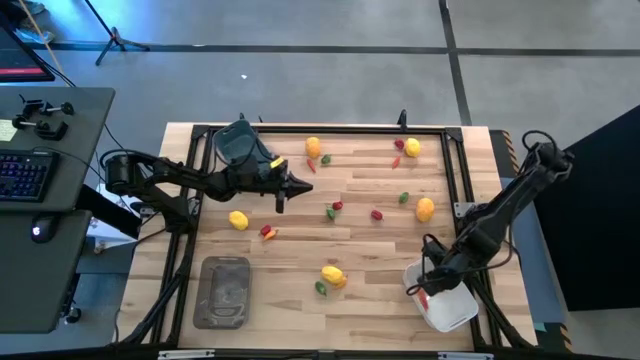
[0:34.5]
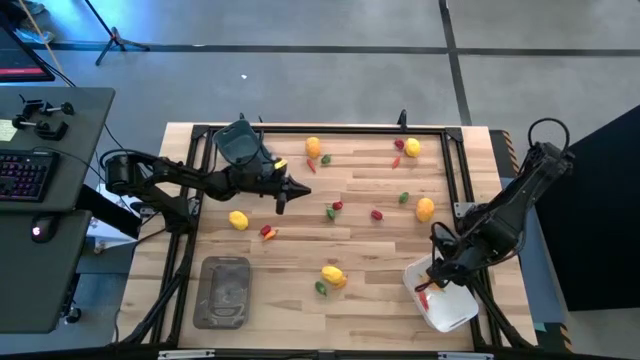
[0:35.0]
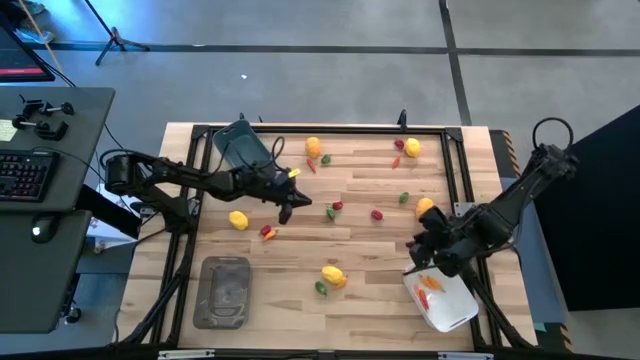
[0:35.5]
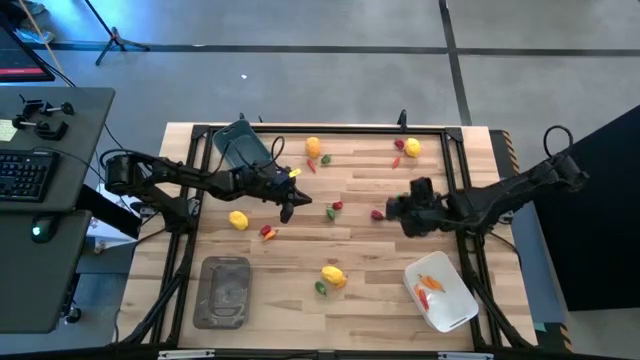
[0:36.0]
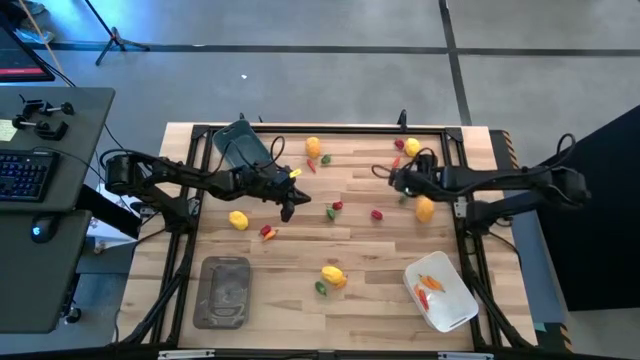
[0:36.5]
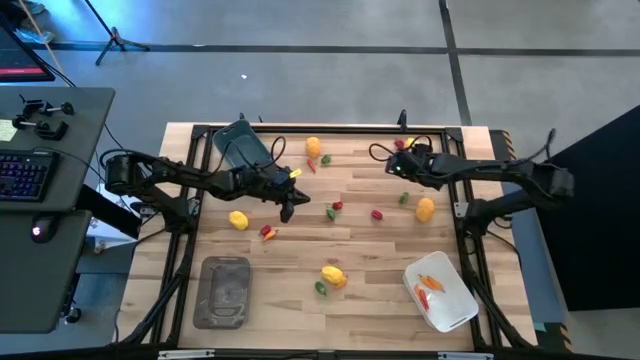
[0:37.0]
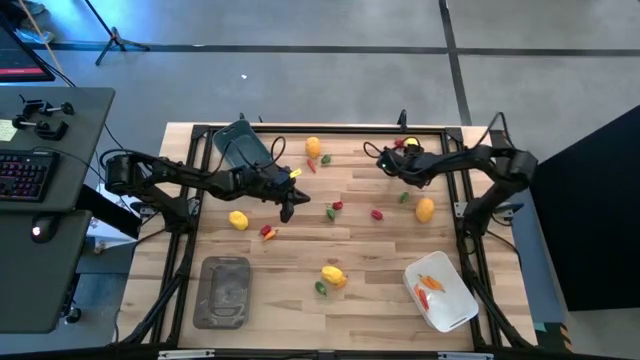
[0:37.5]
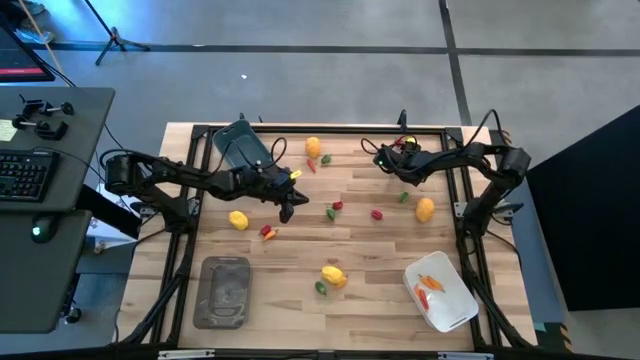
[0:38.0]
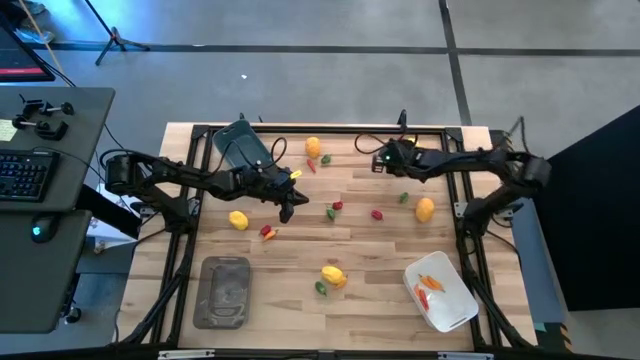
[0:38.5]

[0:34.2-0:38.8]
Task: Sort produce into baskets
Put the dark orange chili pepper into the white bin

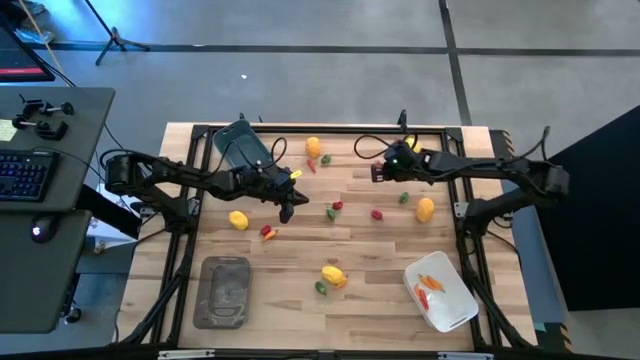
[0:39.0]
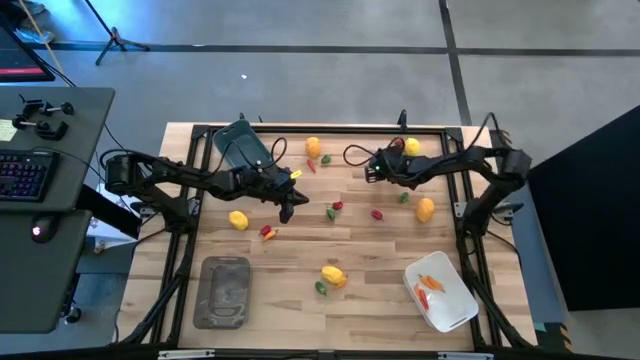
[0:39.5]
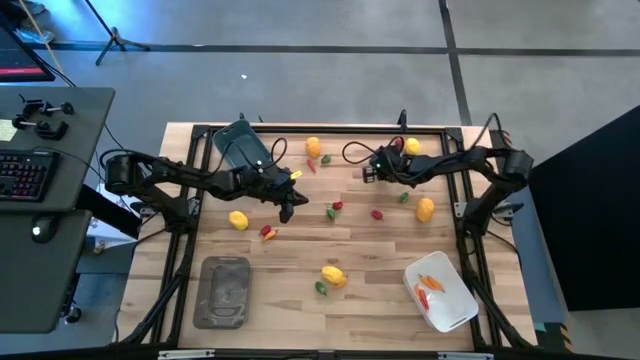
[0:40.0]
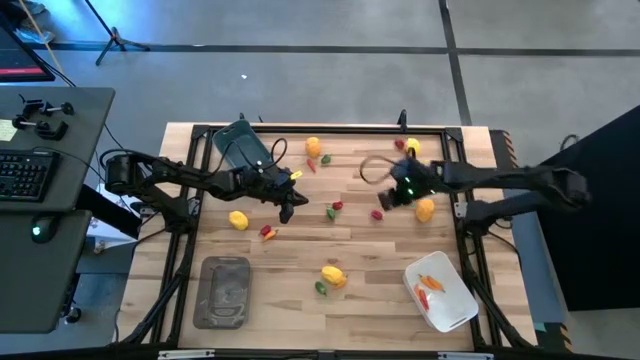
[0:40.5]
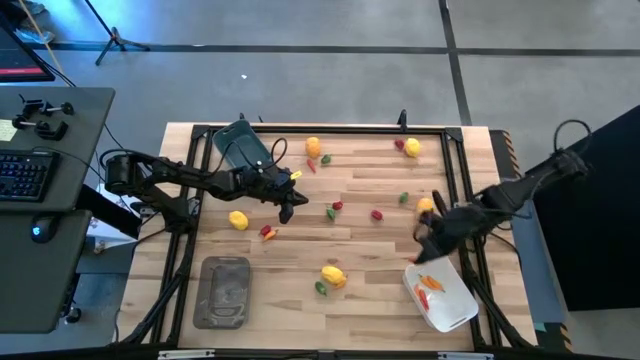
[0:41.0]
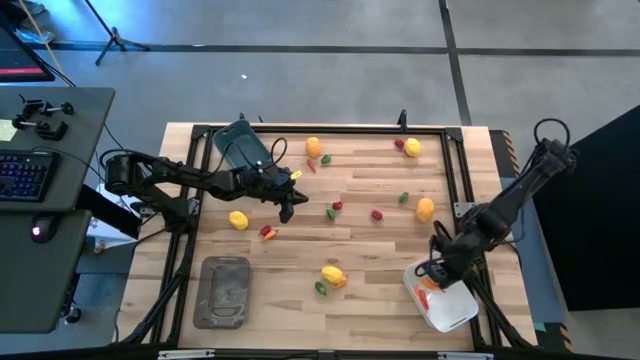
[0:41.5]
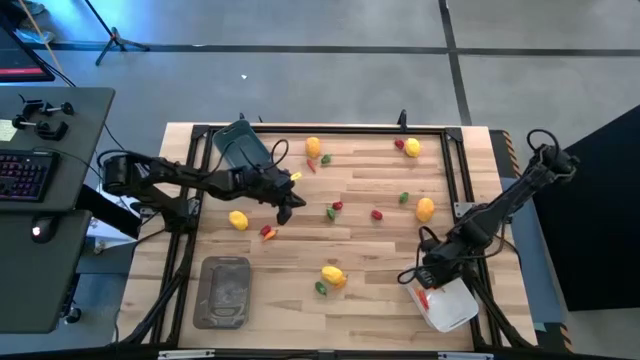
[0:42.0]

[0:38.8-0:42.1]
Put the dark orange chili pepper into the white bin

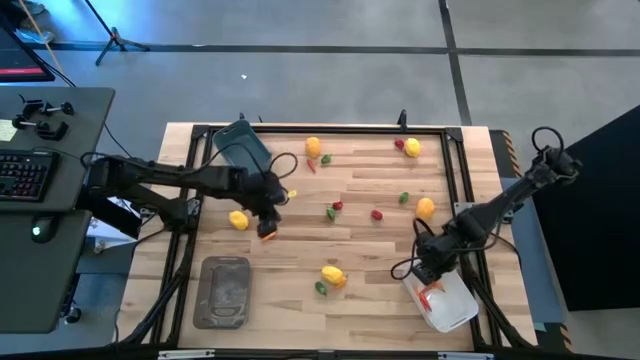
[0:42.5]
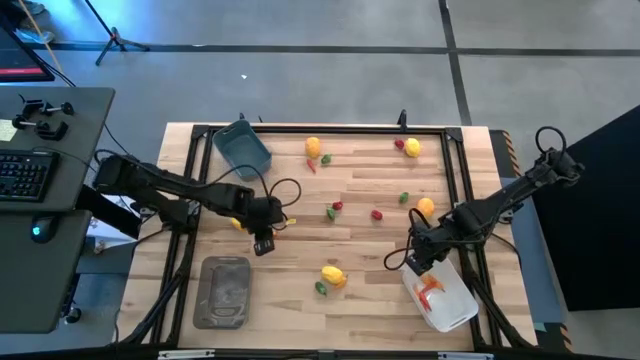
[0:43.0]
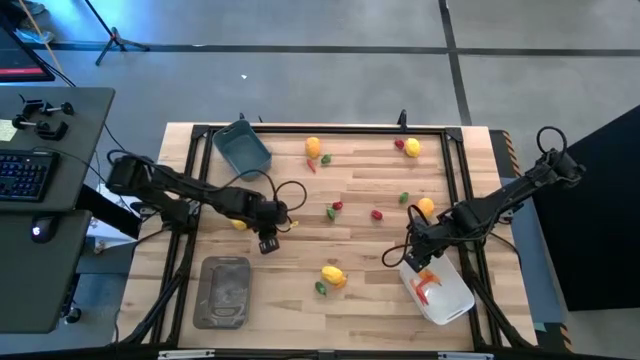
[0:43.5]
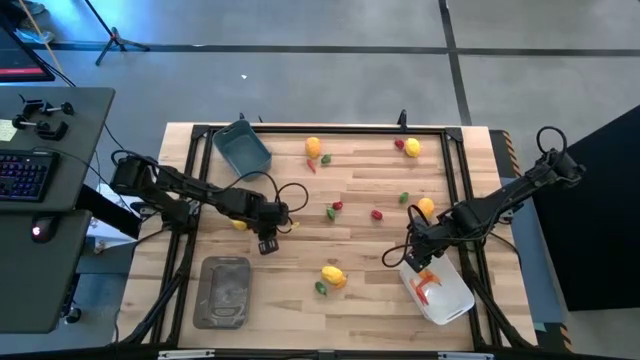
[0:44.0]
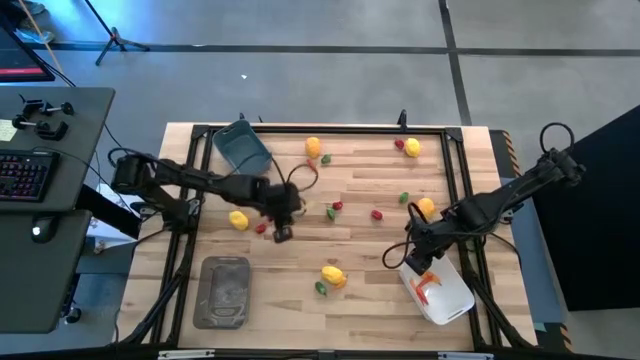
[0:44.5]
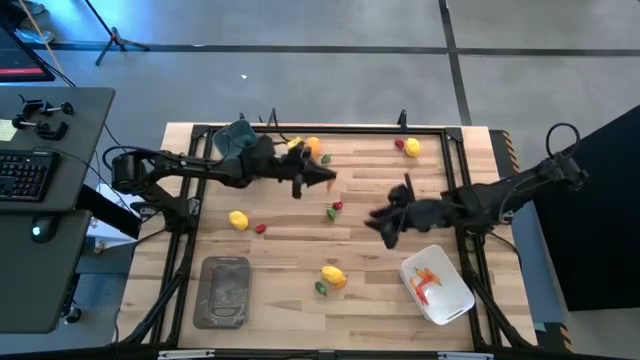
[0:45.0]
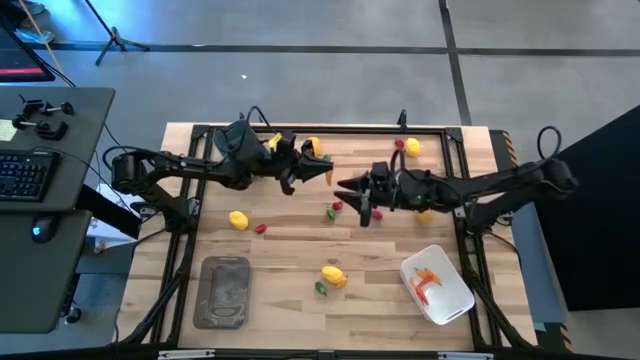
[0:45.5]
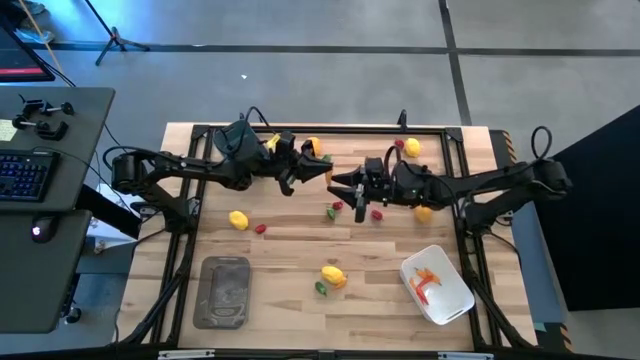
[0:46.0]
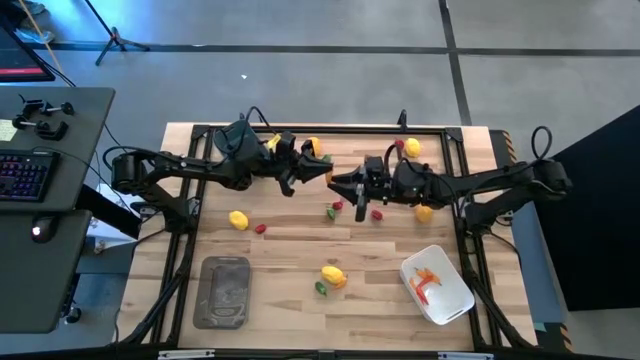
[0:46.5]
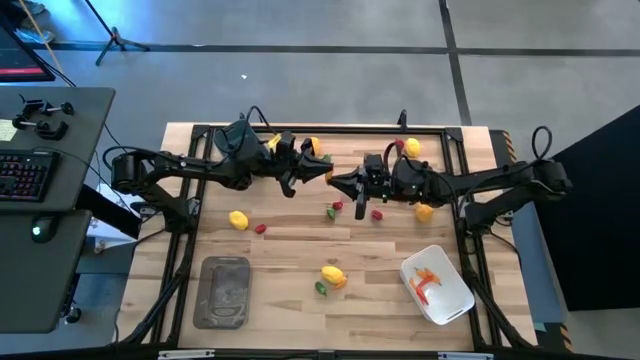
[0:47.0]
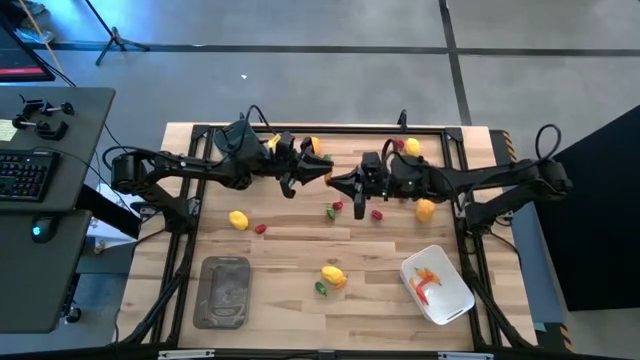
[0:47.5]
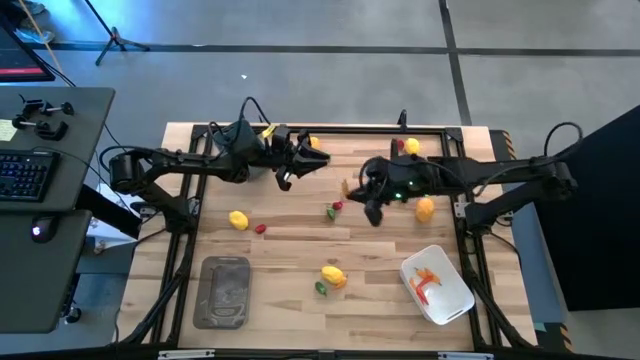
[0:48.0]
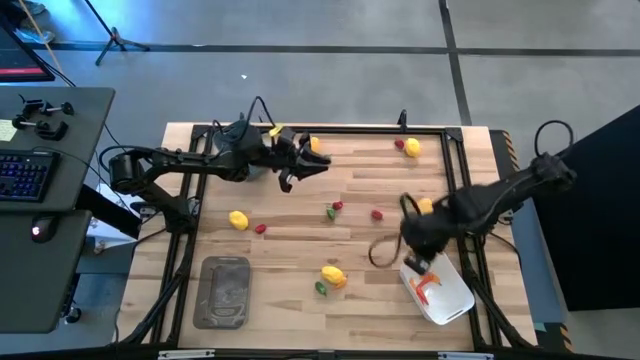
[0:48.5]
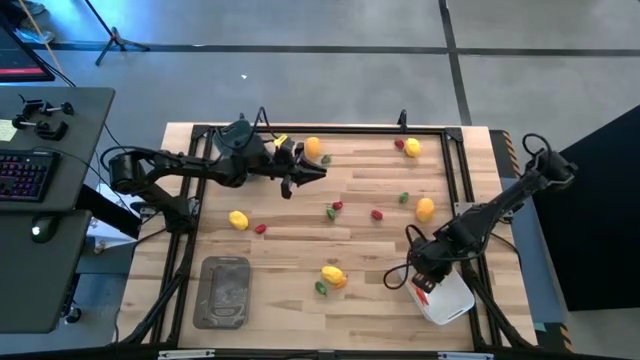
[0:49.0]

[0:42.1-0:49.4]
Put the light orange chili pepper into the white bin

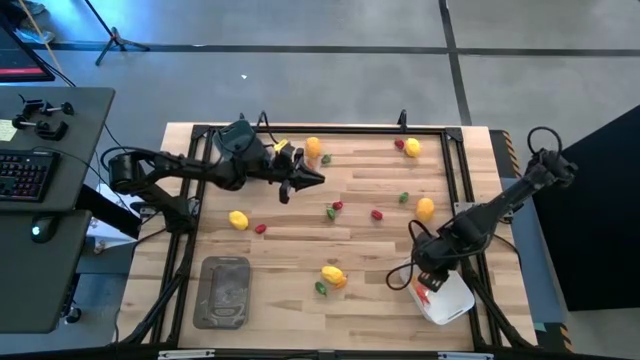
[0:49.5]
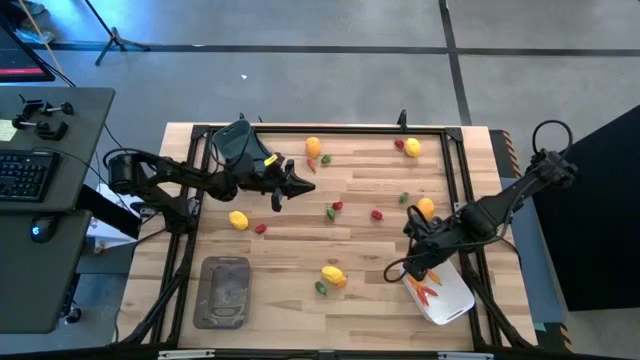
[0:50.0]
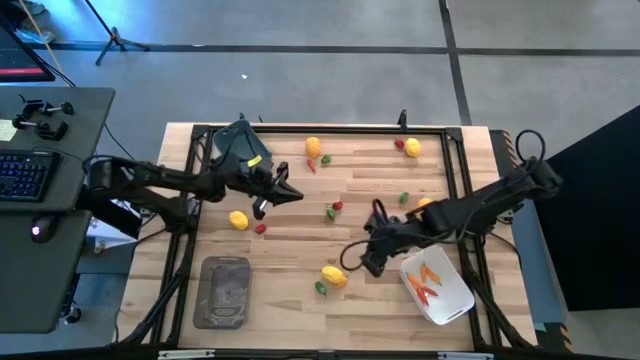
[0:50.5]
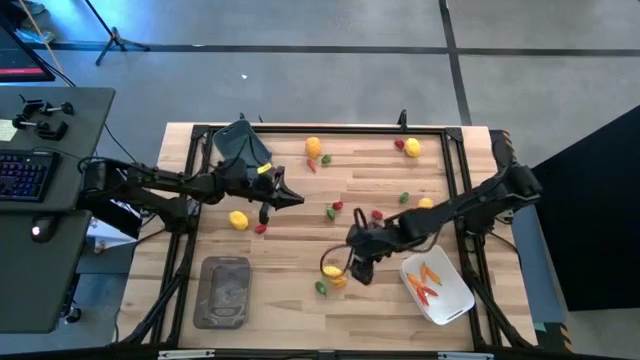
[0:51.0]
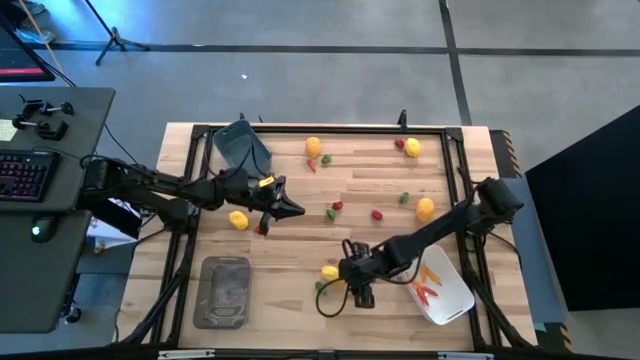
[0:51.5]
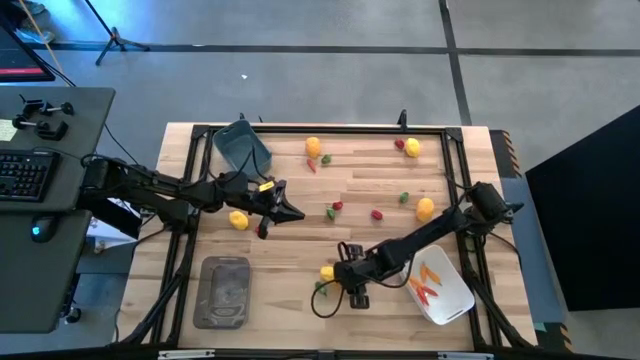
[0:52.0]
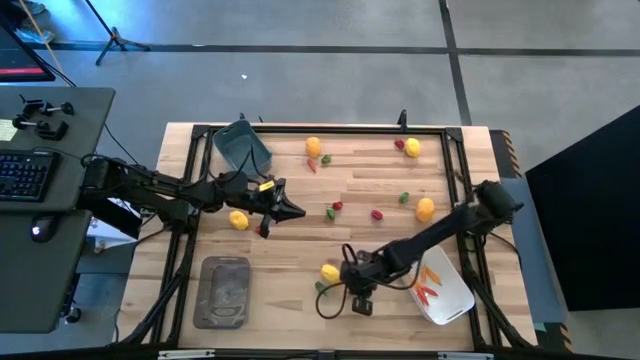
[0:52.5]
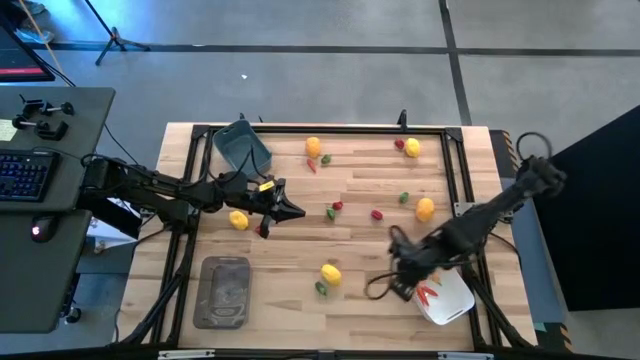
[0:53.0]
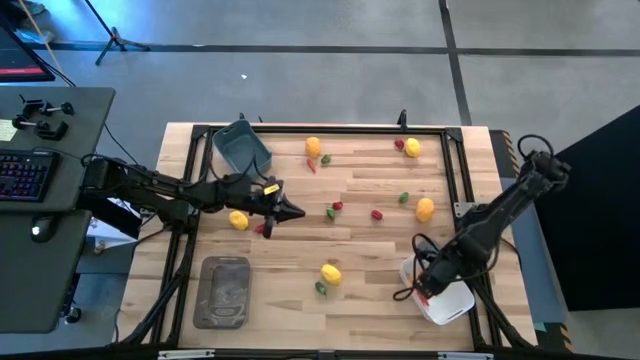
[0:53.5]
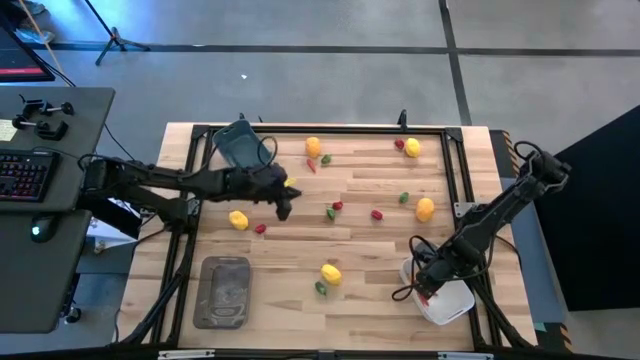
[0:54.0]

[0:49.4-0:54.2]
Put the light orange chili pepper into the white bin
